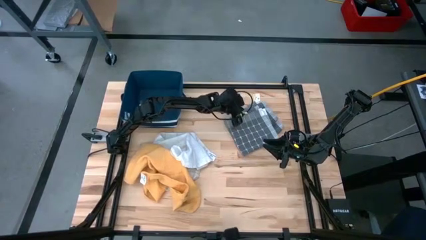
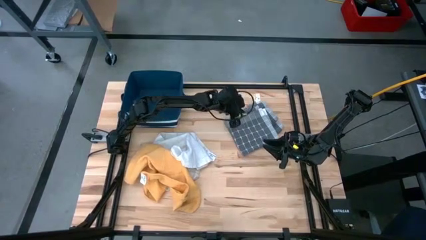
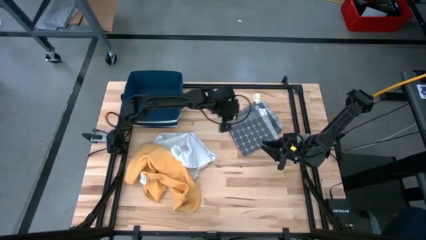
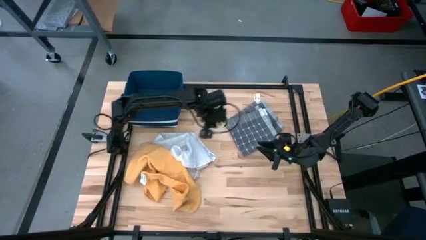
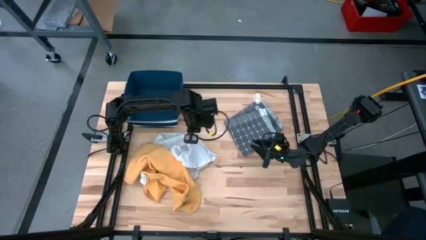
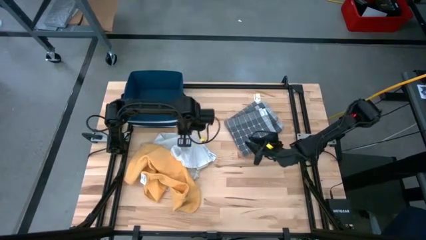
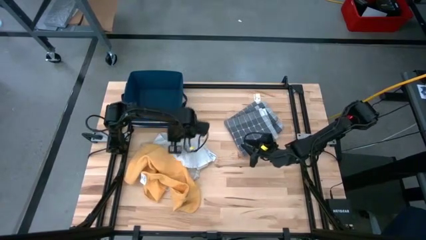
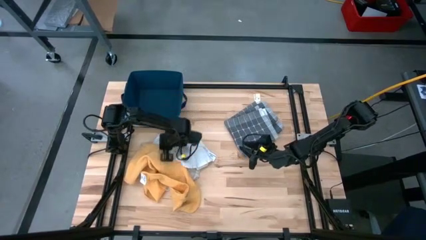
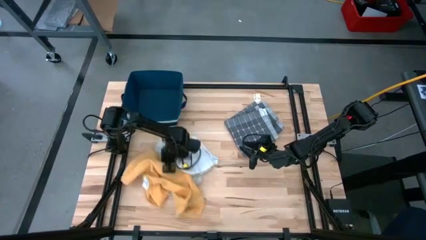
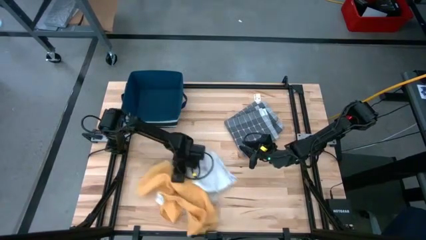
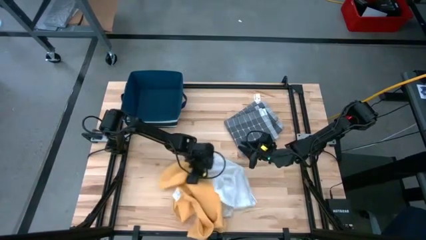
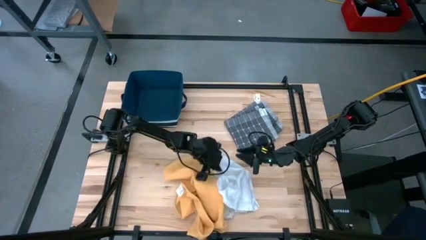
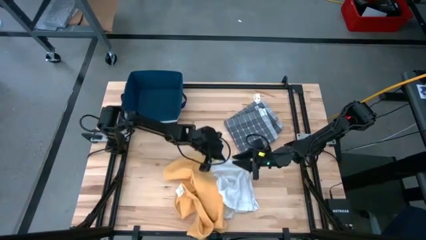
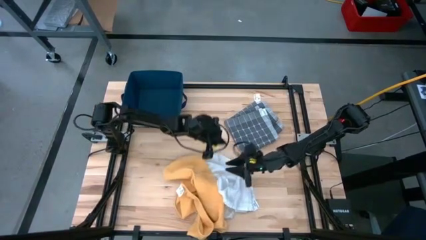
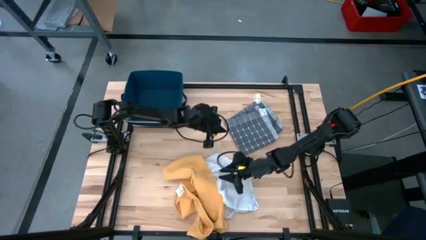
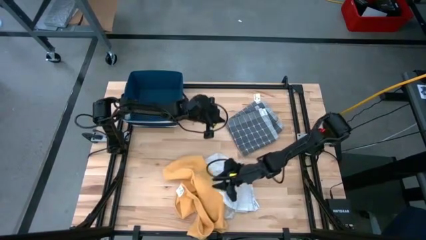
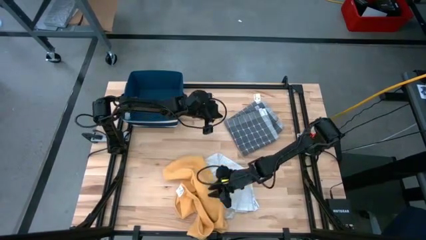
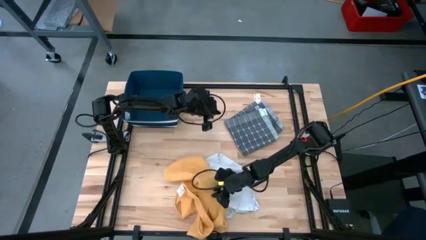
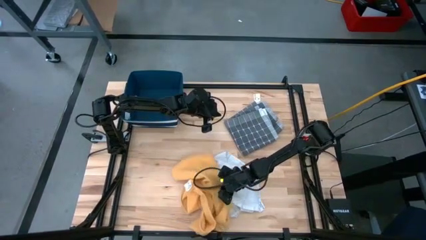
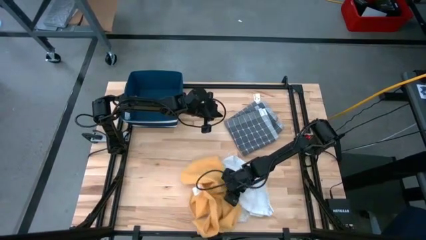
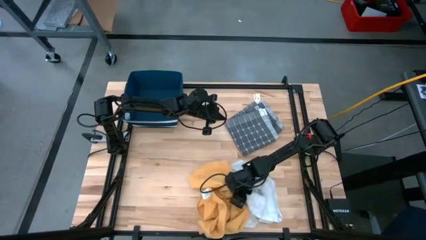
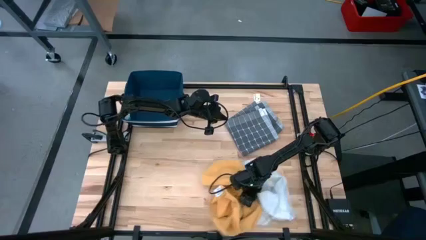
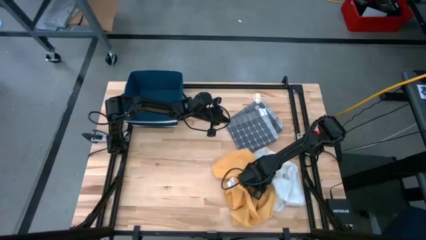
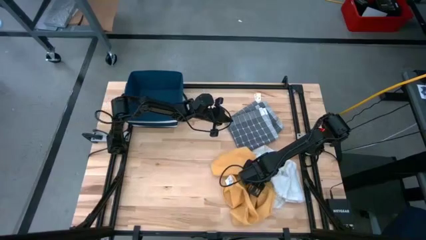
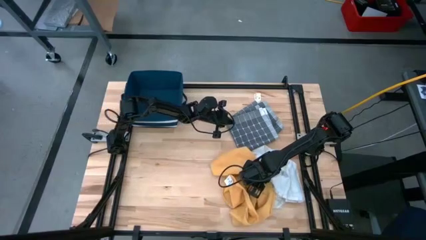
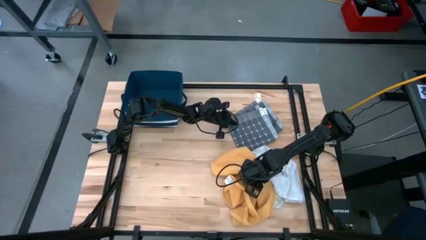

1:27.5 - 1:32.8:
Task: Fold towel
Adjust the yellow and white towels to the bottom right of the table

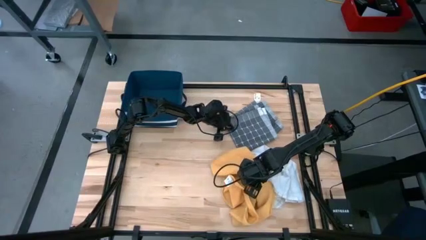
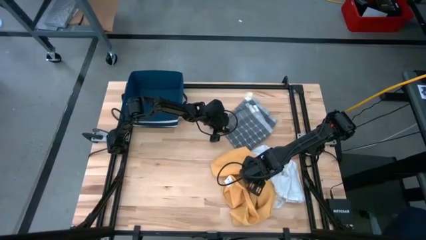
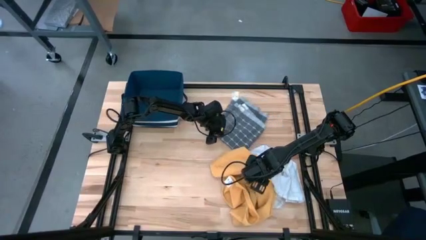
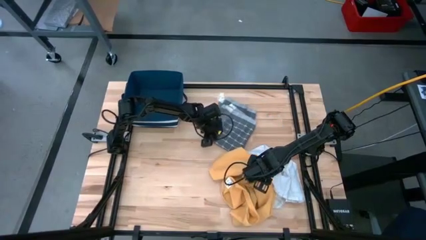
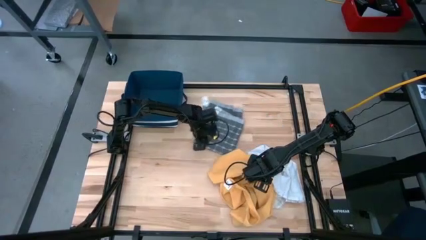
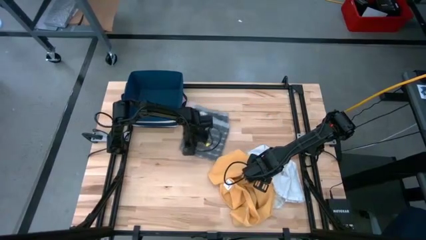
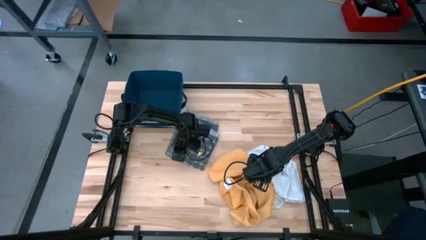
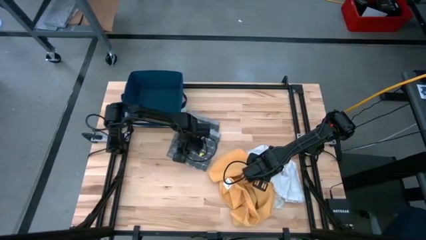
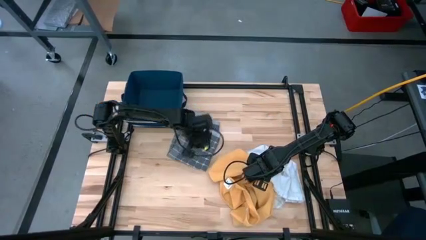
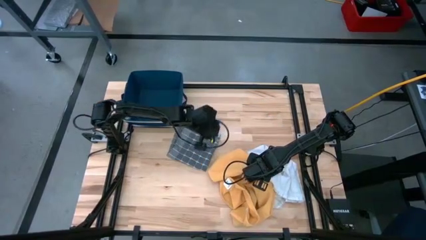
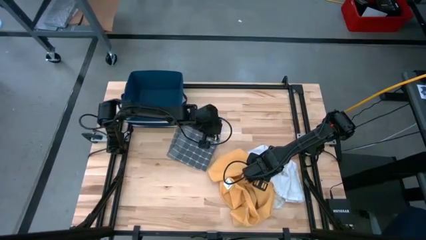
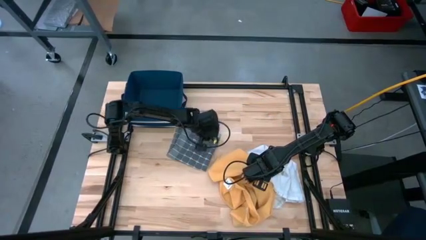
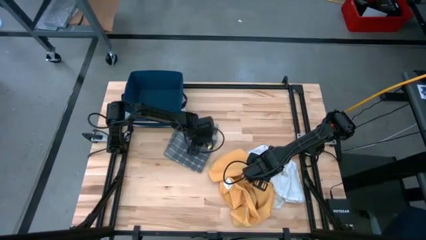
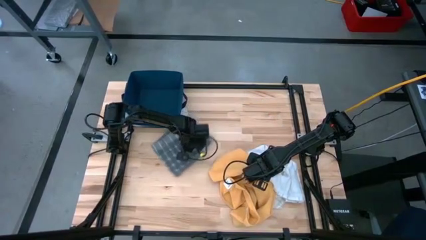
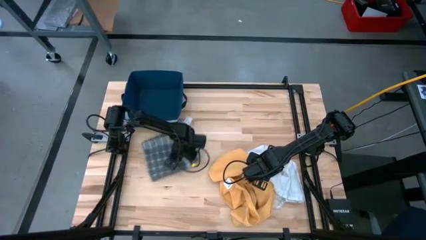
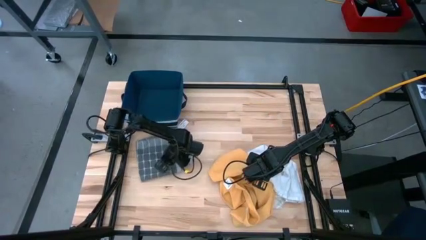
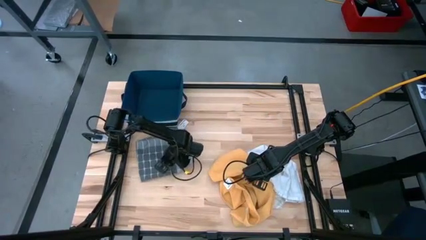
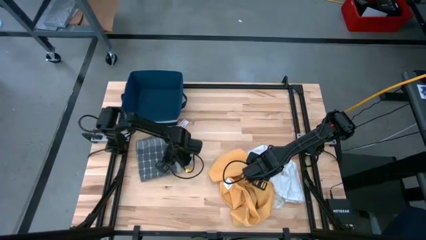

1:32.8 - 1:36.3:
Move the gray towel to the middle left of the table

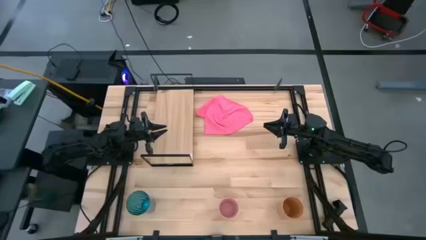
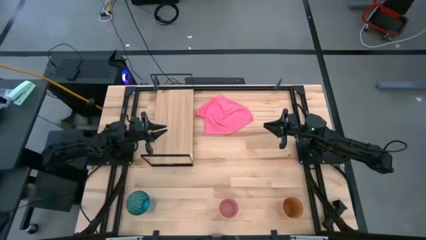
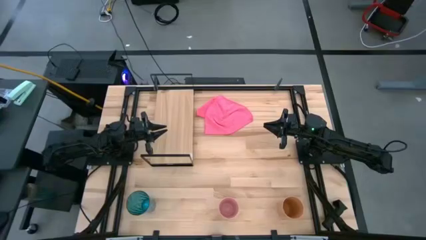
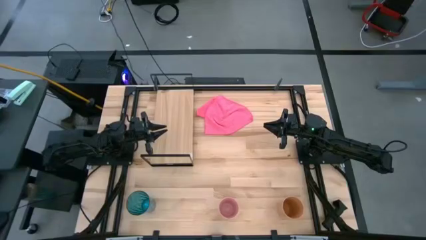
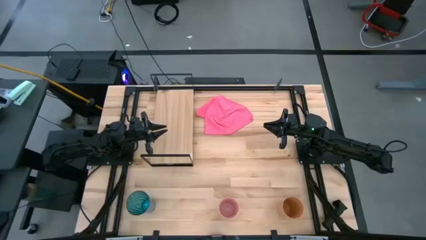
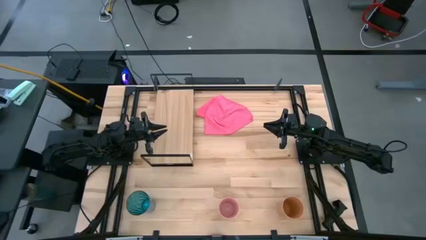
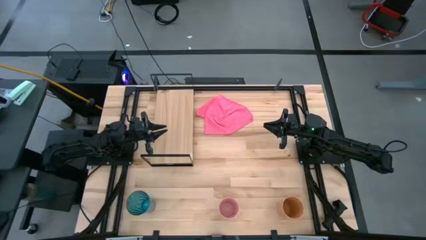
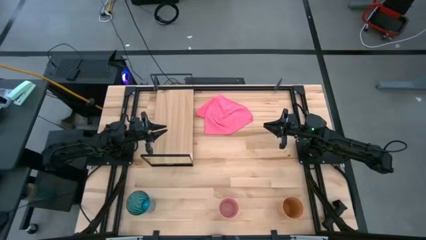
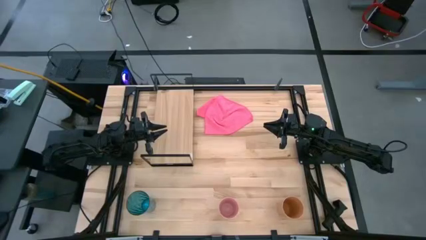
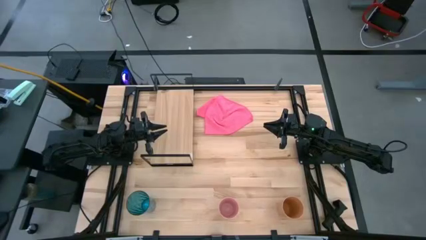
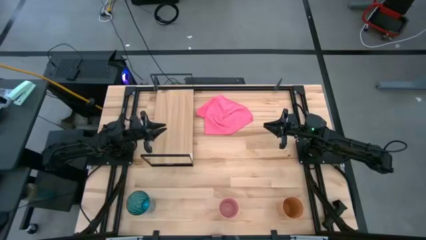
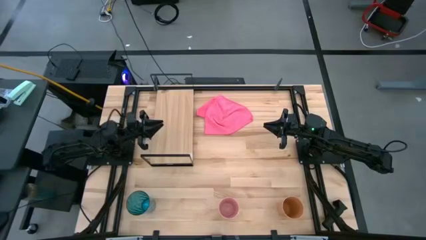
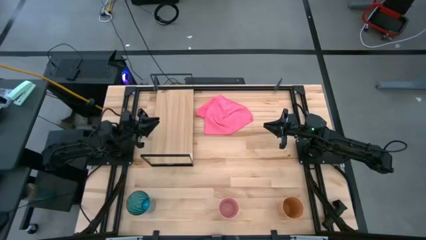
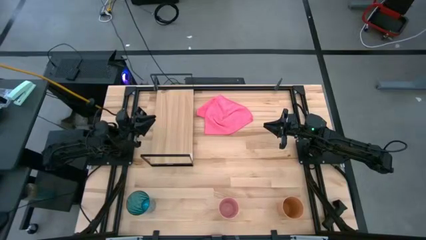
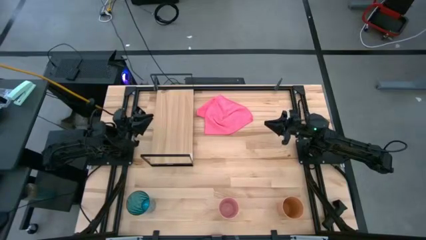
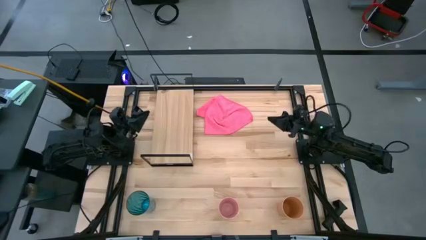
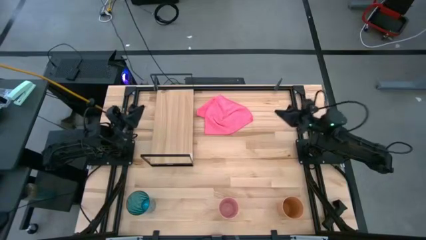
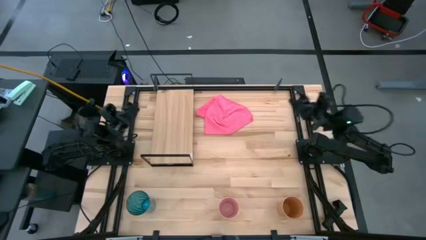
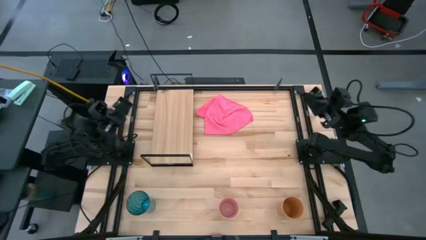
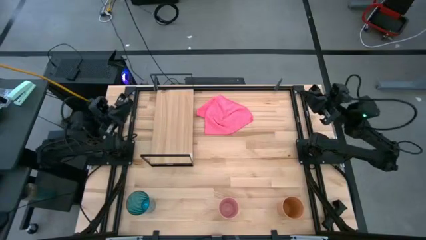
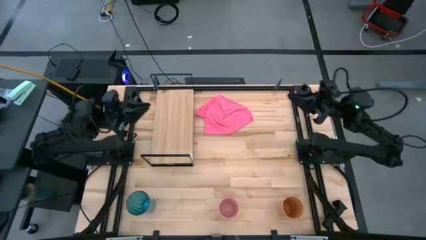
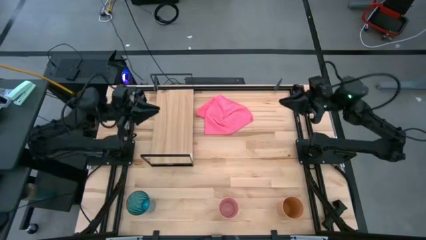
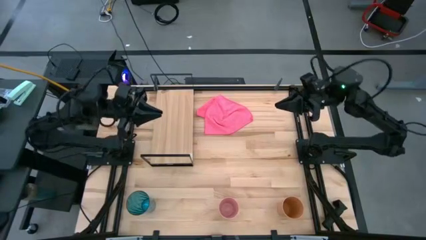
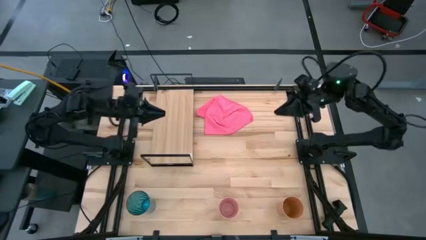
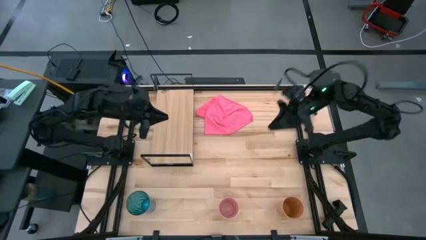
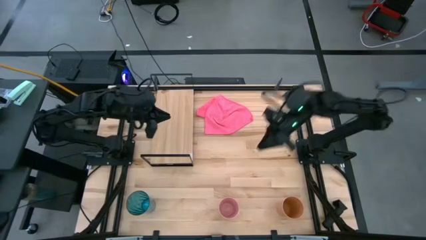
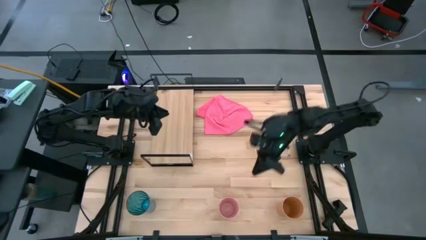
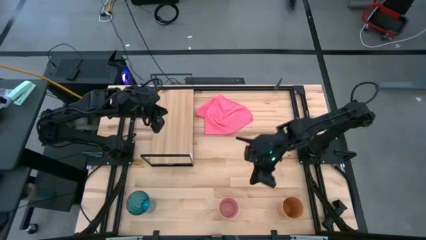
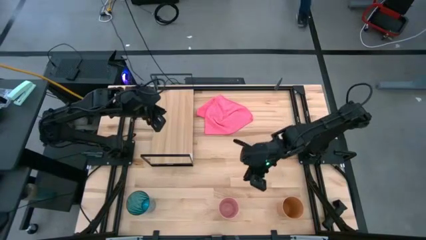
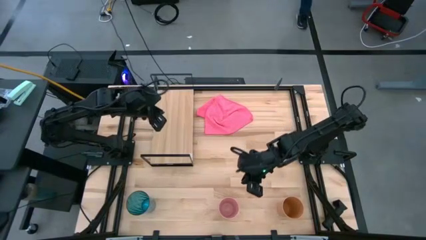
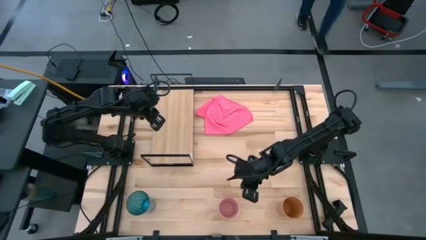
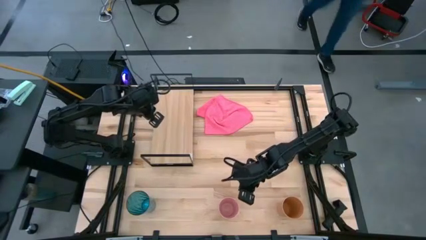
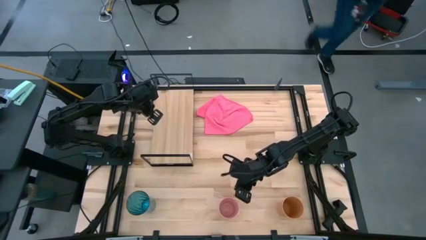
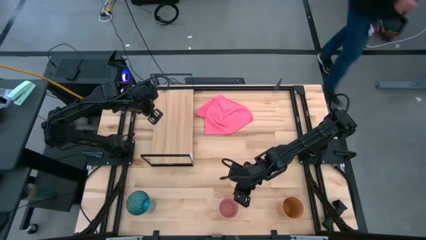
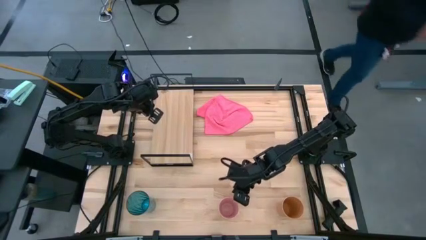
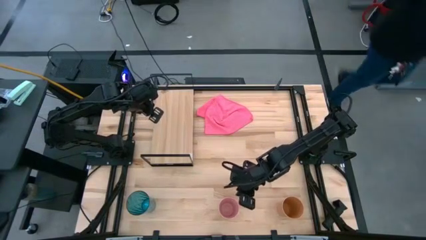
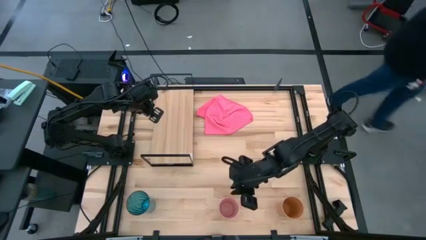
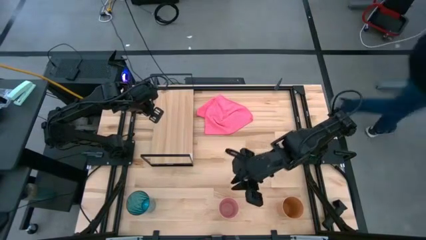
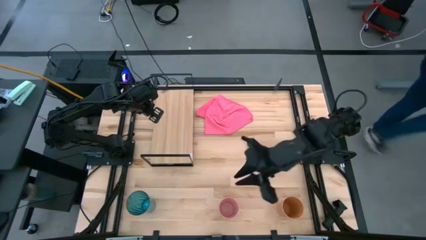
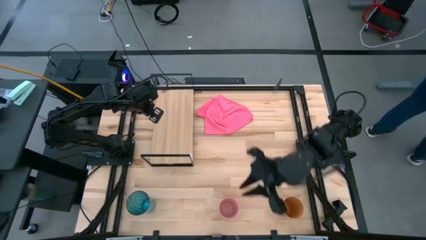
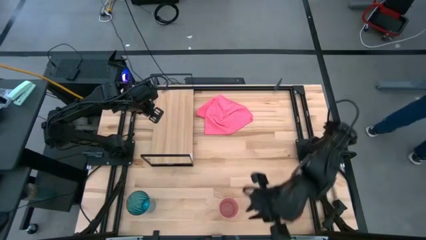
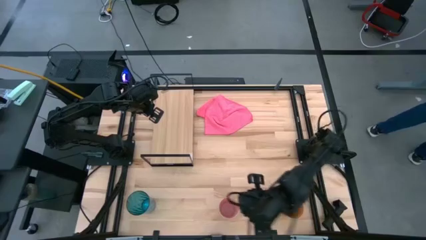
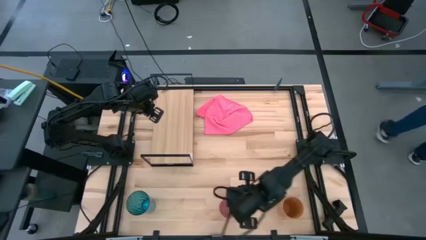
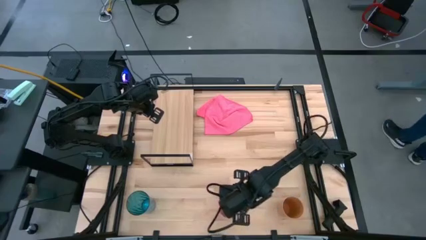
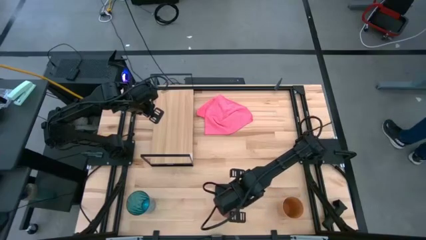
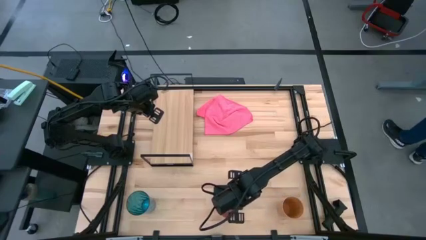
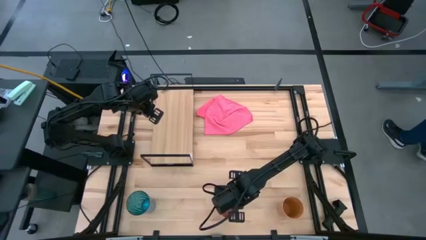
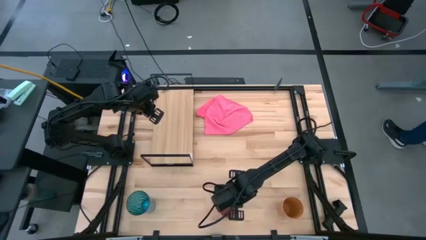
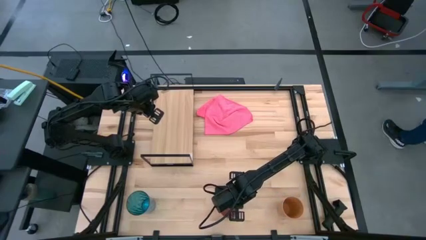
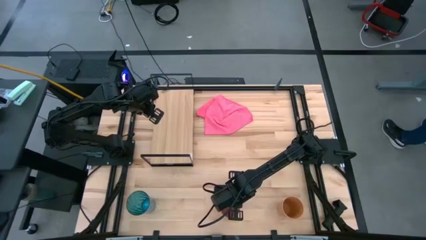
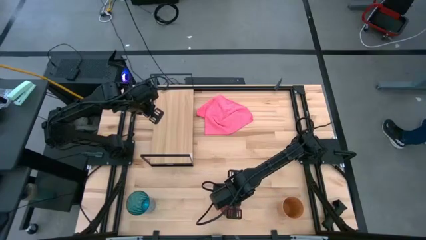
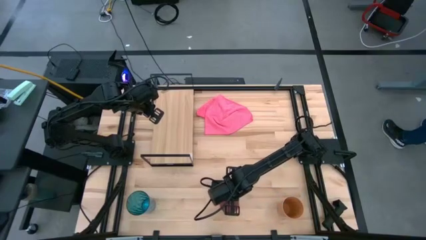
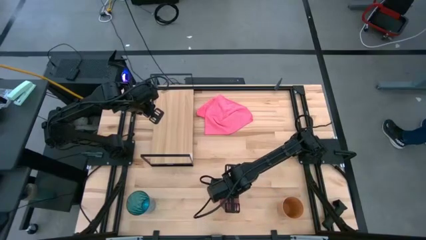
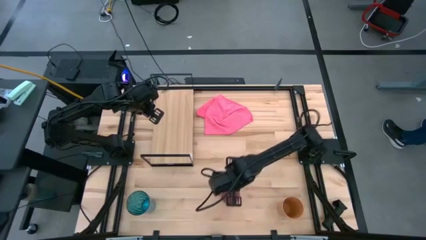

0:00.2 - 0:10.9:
Task: Stack small to large cups/mugs on shelf
Put the pink cup on the shelf
